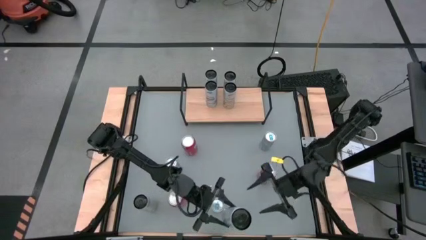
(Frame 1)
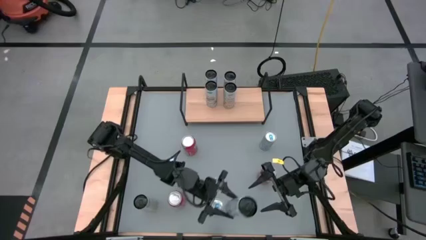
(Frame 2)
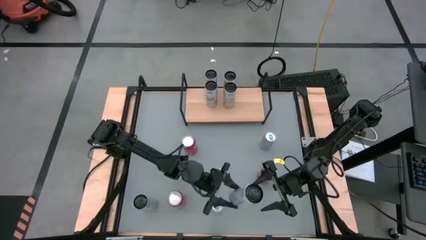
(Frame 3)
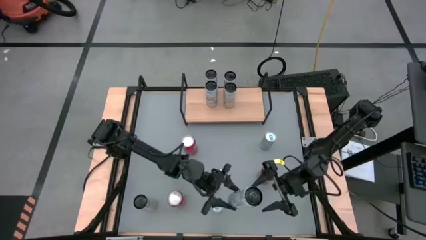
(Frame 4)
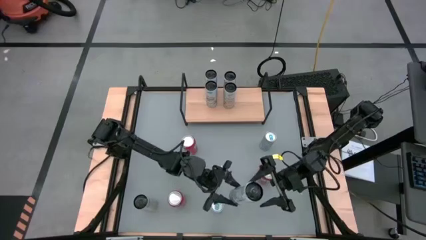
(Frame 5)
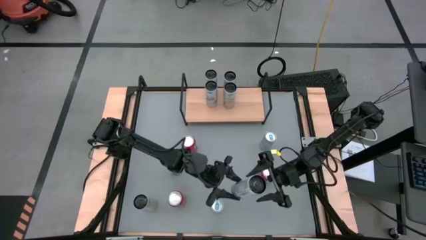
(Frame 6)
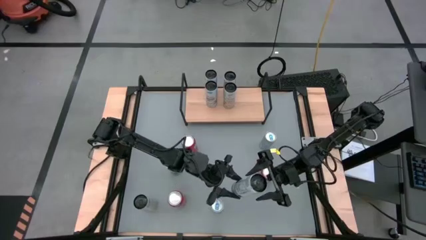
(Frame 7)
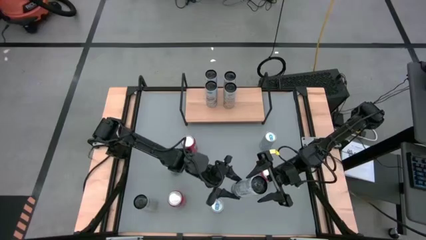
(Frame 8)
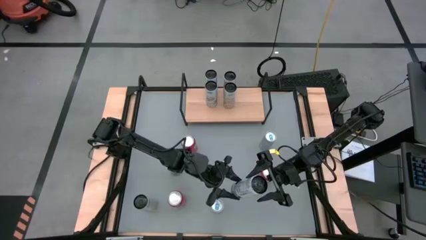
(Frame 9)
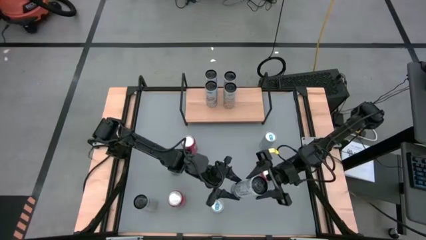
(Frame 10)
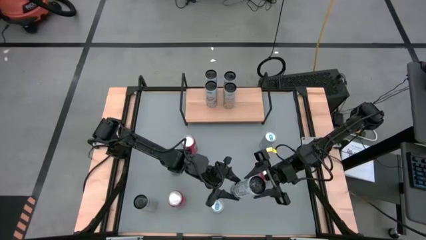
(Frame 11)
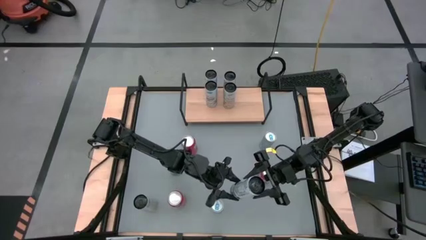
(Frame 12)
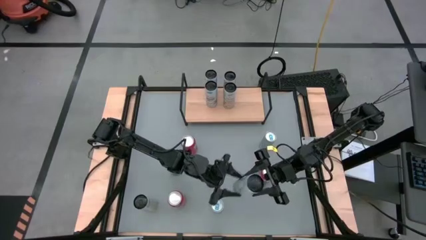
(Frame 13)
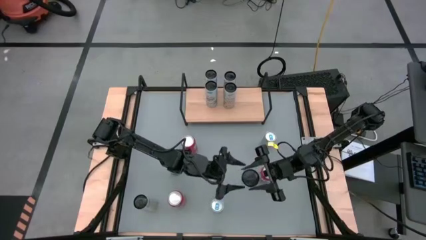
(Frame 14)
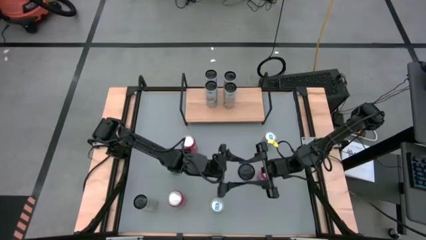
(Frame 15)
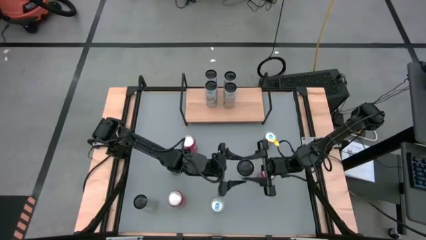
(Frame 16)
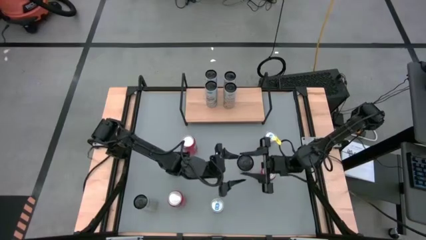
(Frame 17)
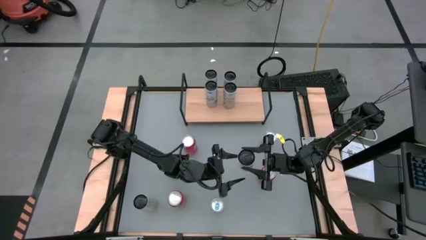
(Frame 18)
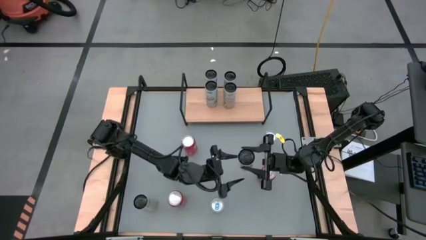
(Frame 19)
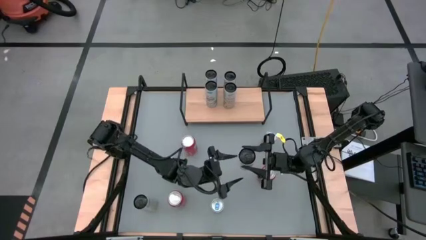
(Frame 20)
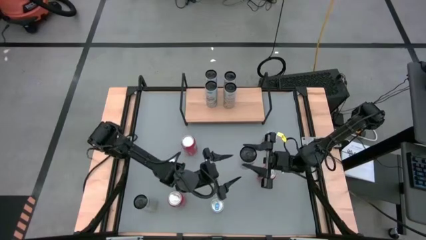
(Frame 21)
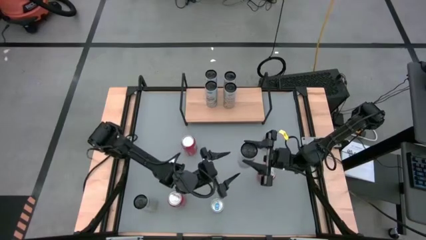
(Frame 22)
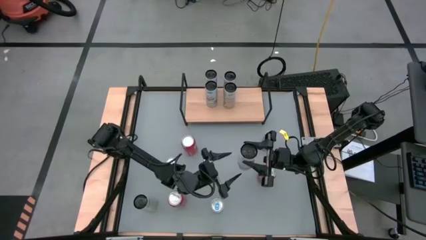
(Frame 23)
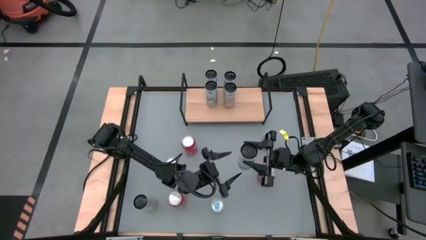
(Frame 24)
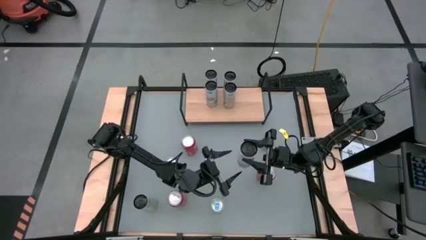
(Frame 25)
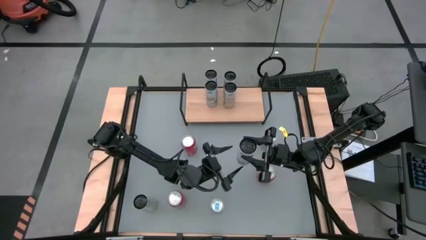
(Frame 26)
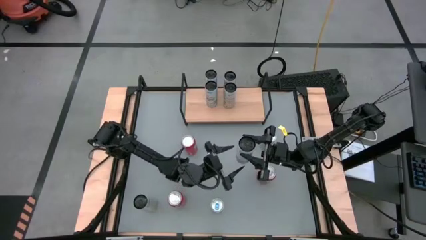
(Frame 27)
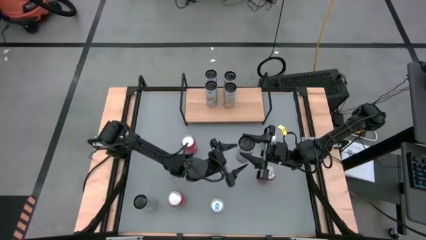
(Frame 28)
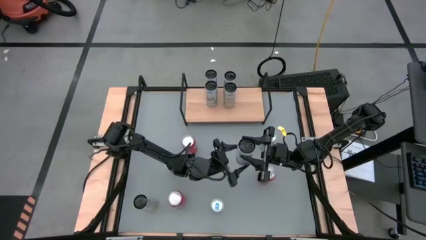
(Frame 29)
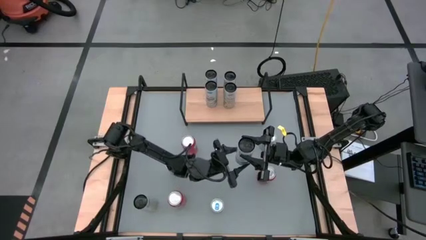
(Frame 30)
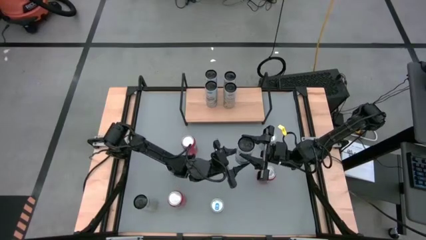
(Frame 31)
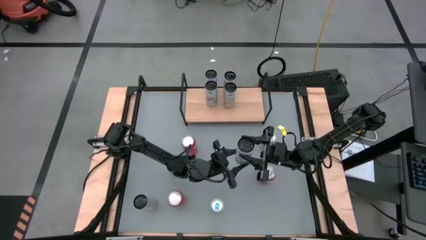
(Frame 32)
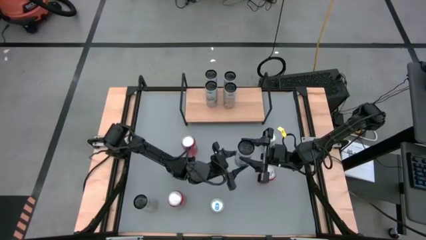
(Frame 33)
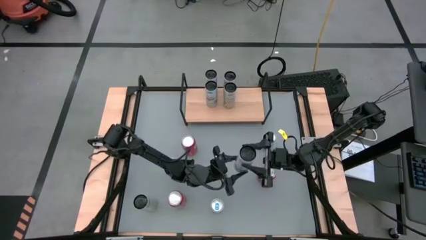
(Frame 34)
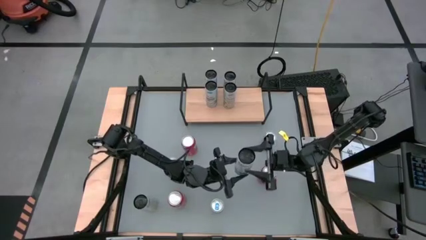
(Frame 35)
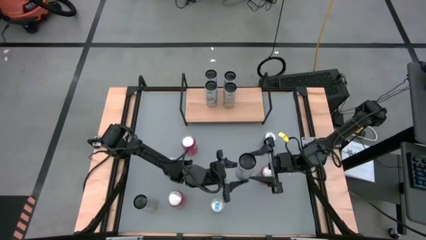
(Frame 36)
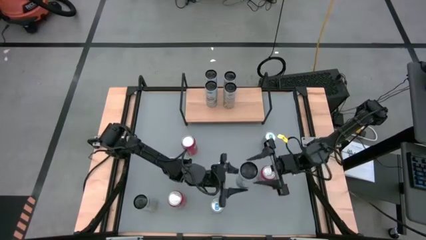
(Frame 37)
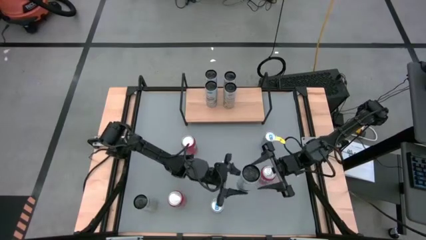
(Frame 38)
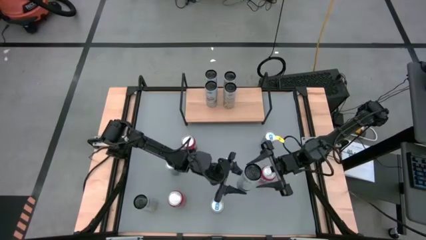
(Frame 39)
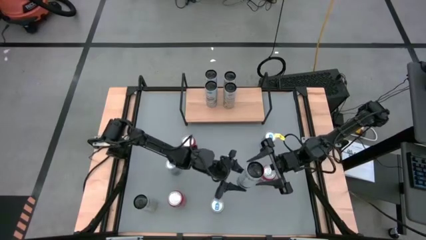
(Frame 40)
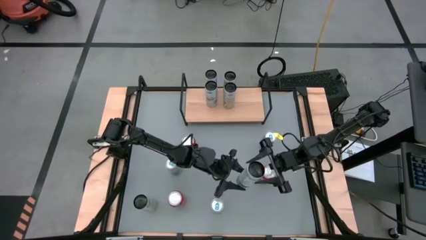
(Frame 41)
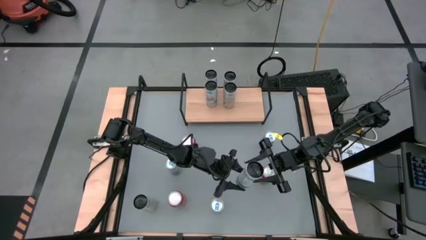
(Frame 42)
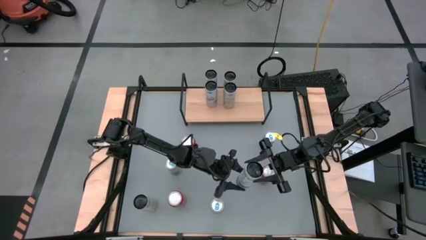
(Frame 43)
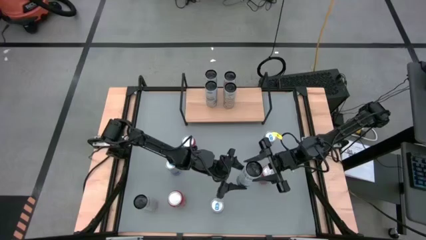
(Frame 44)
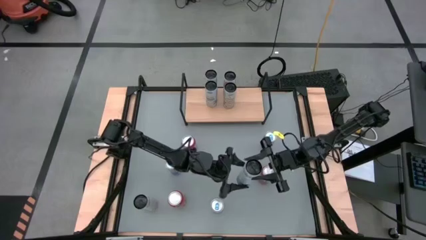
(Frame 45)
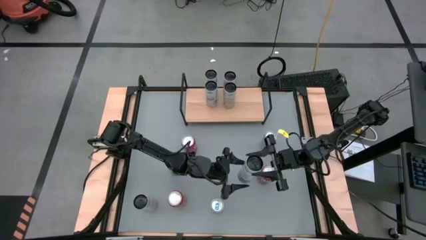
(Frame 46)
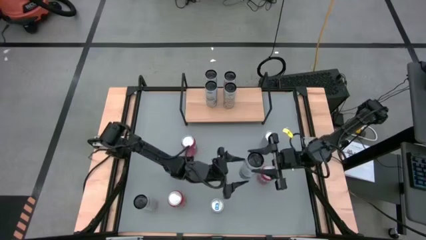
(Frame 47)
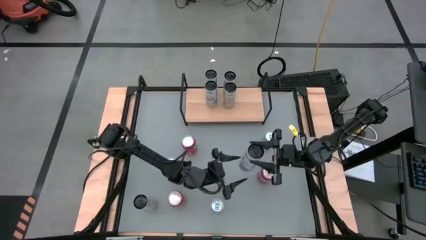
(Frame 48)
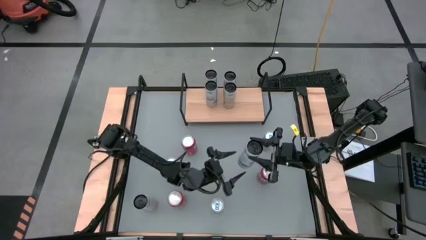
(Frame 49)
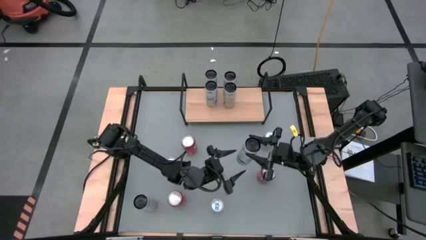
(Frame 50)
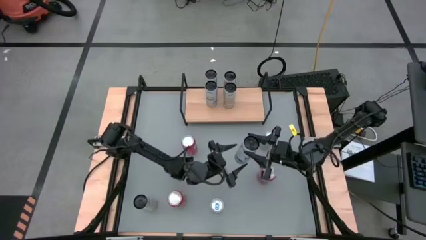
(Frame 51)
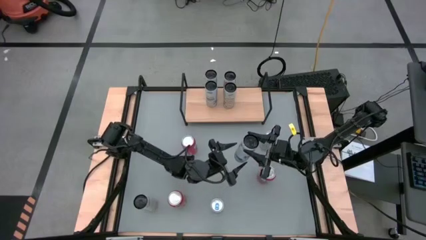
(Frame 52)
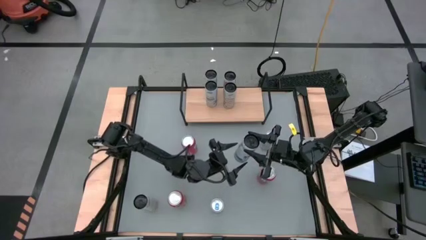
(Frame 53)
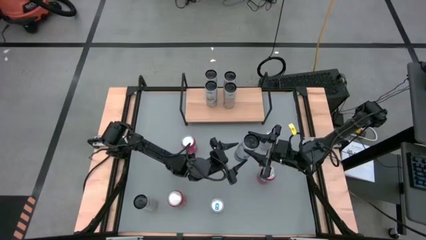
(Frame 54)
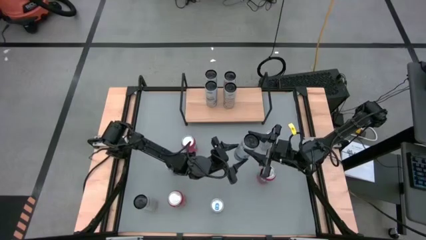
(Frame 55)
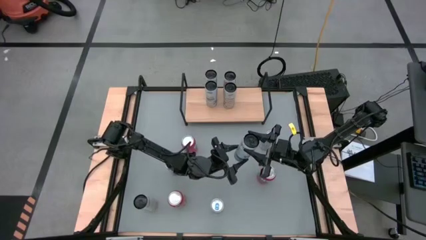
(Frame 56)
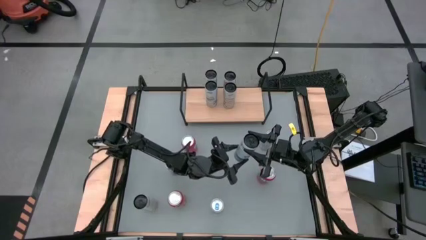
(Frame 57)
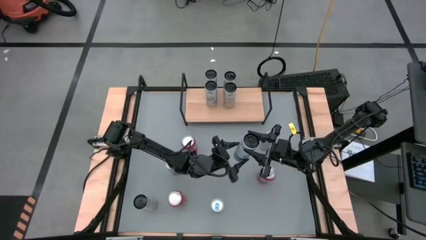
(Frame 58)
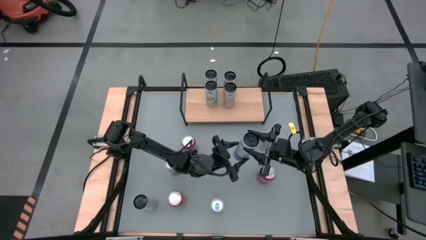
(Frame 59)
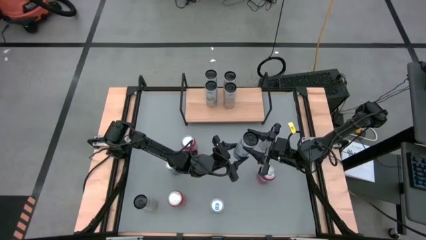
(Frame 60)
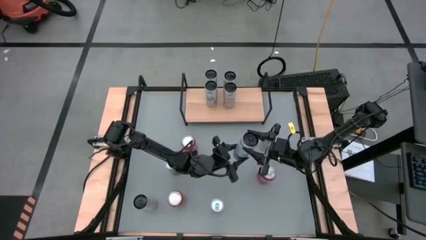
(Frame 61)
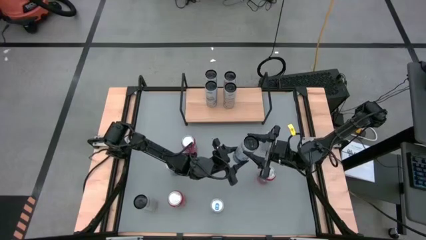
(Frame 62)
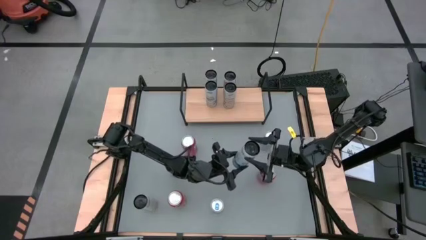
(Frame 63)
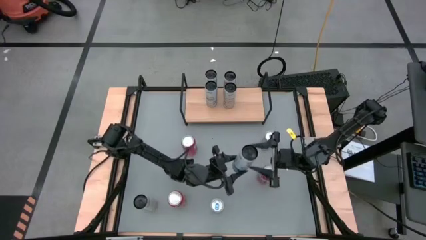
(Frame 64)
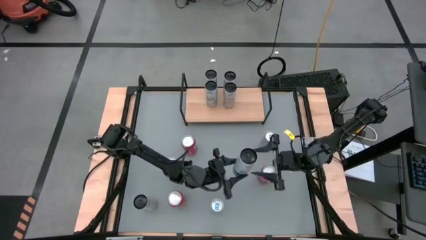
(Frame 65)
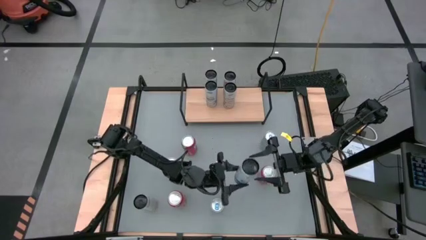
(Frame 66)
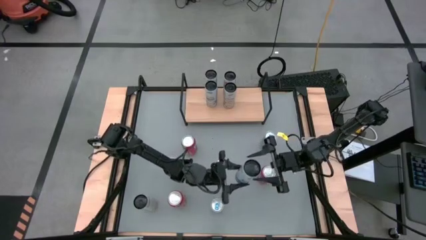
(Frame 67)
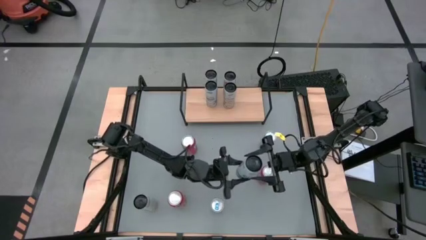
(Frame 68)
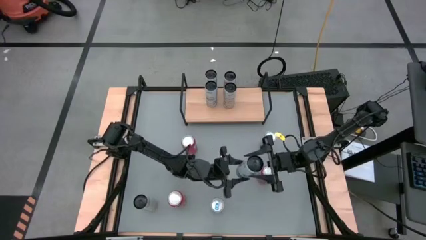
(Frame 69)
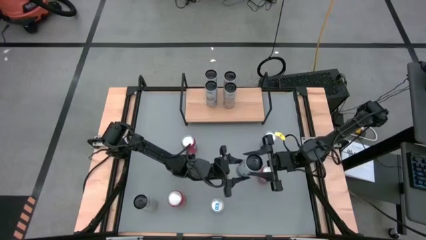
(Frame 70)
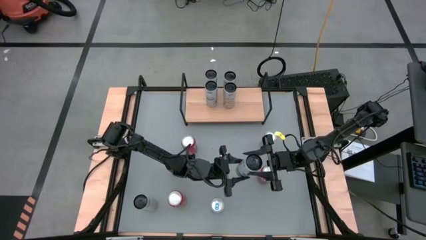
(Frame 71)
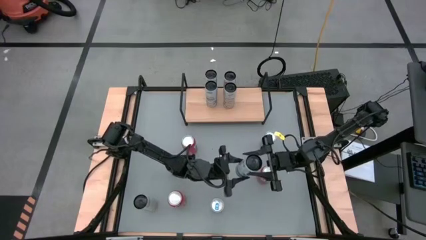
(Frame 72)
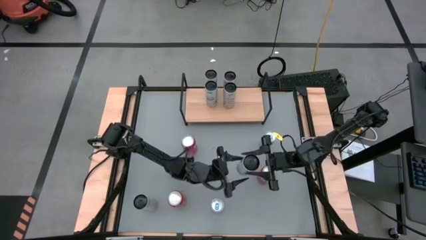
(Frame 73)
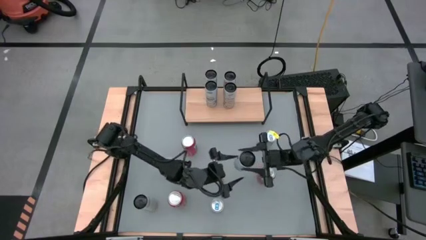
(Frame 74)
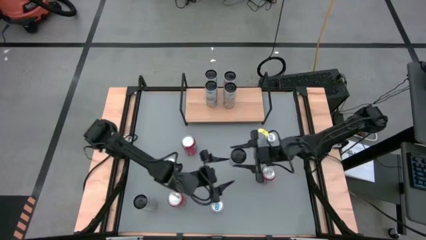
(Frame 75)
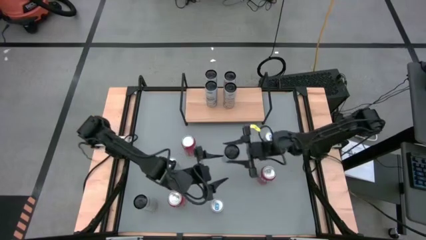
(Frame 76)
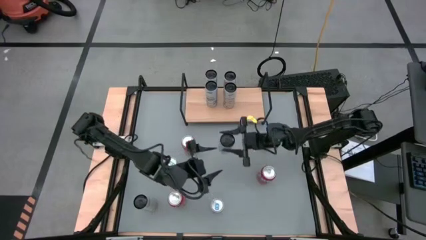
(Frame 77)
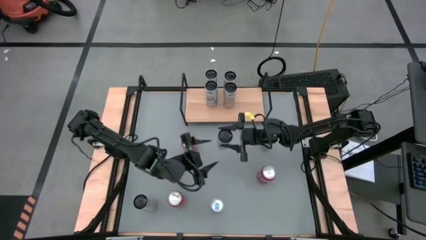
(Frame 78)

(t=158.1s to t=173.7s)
Task: Place canned beverage on shelf
Put the white blue soda can aligned with the other white blue soda cans on the shelf
